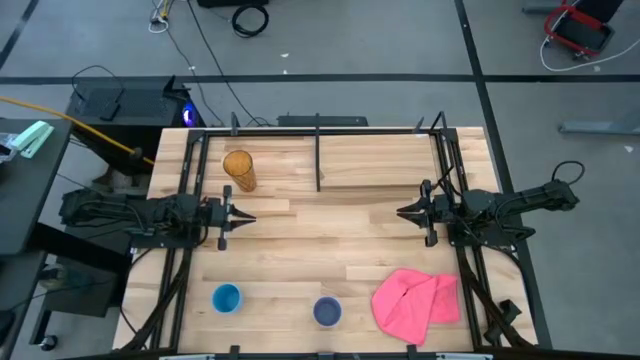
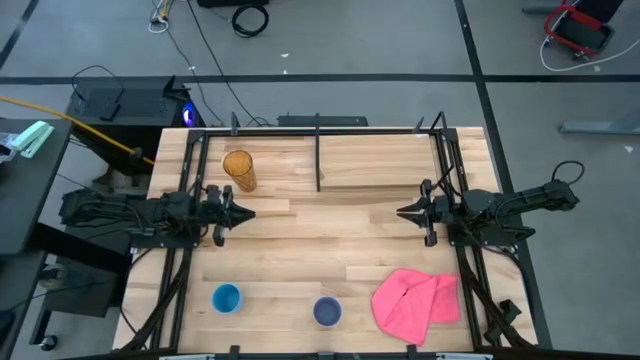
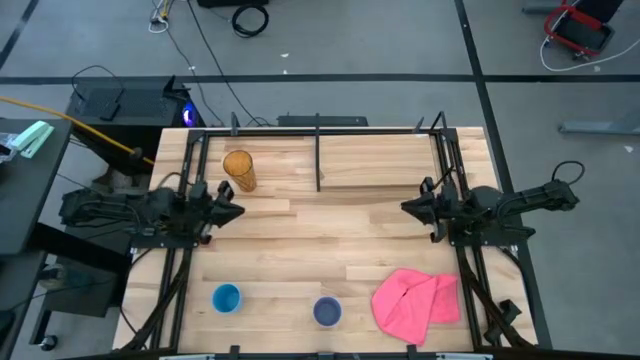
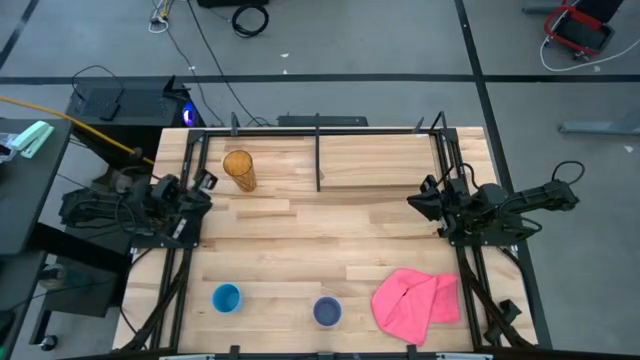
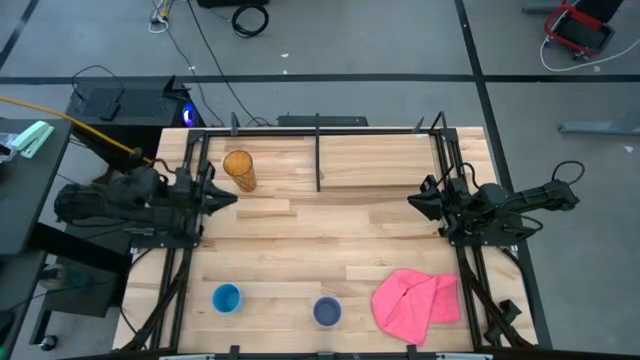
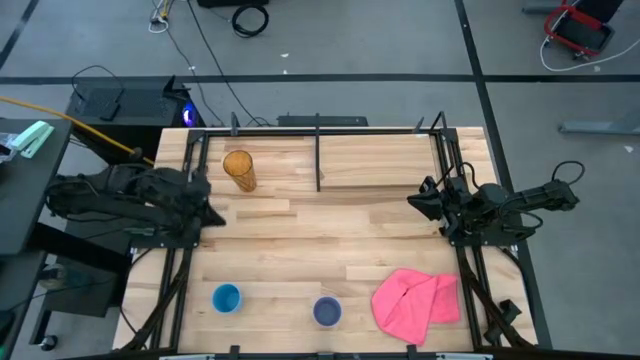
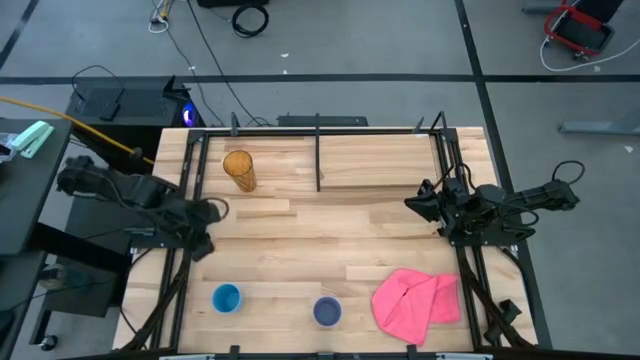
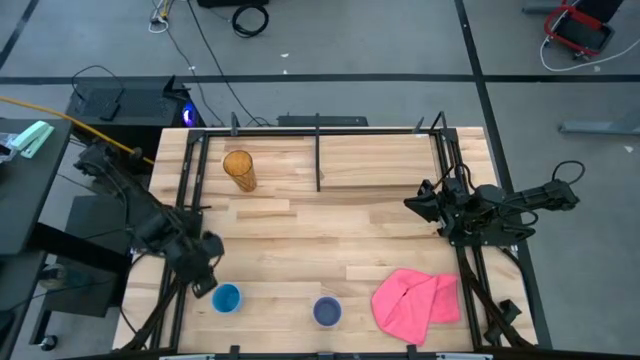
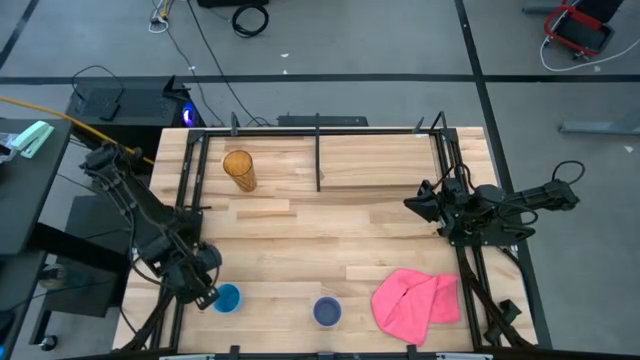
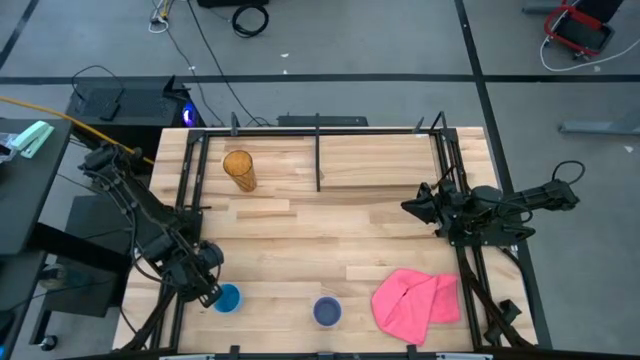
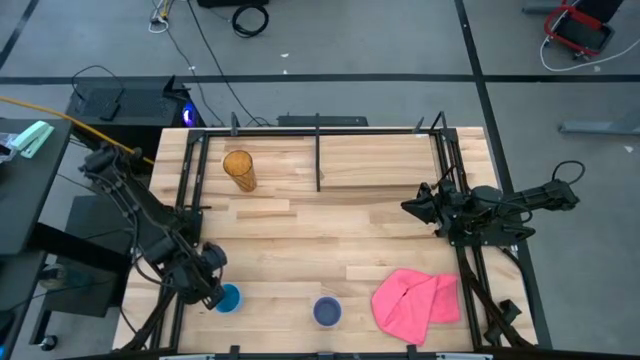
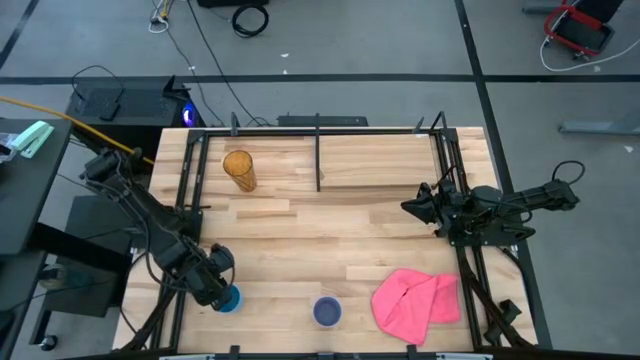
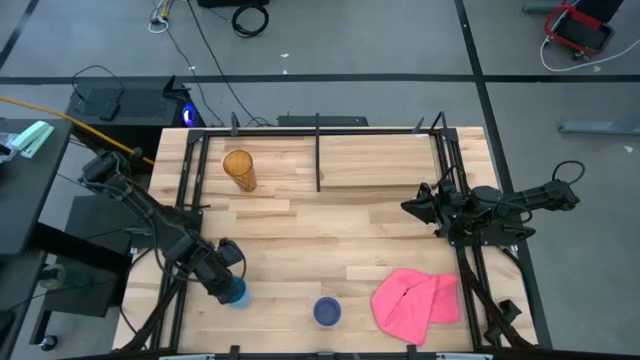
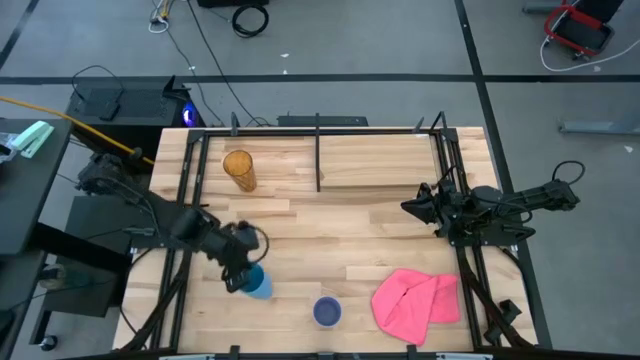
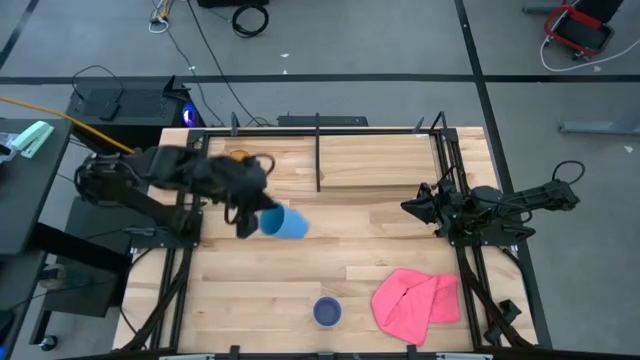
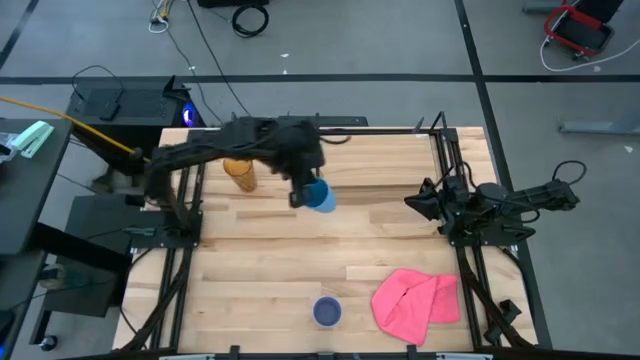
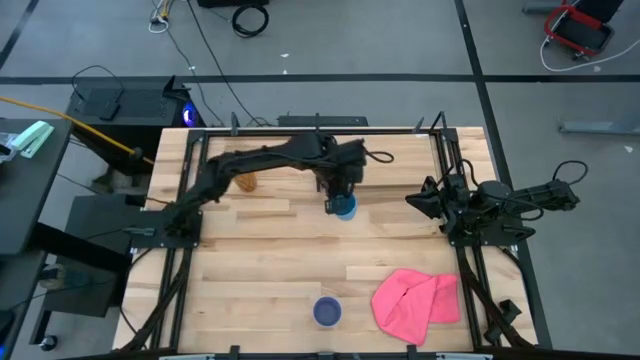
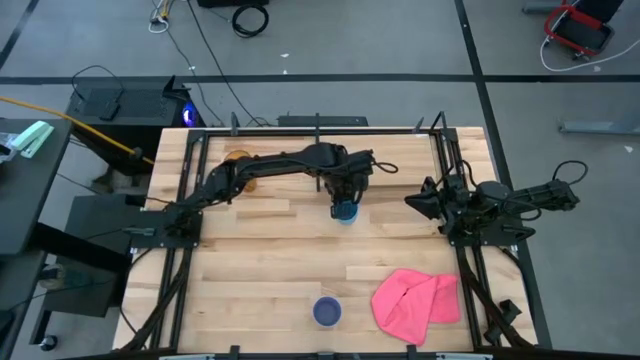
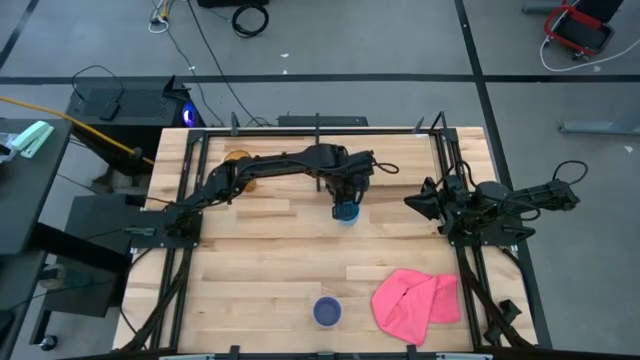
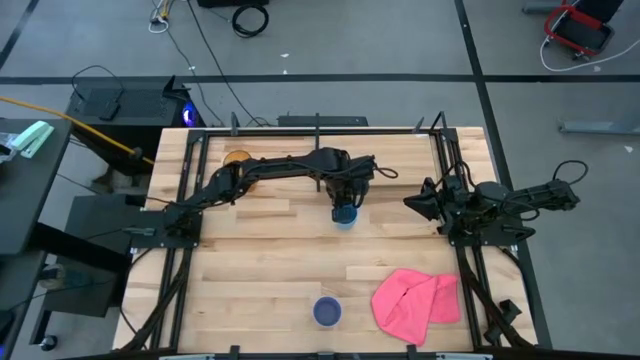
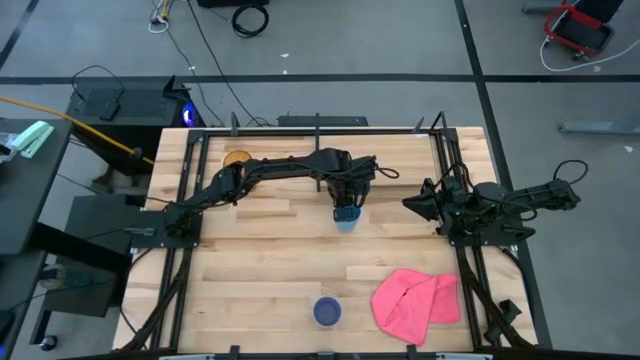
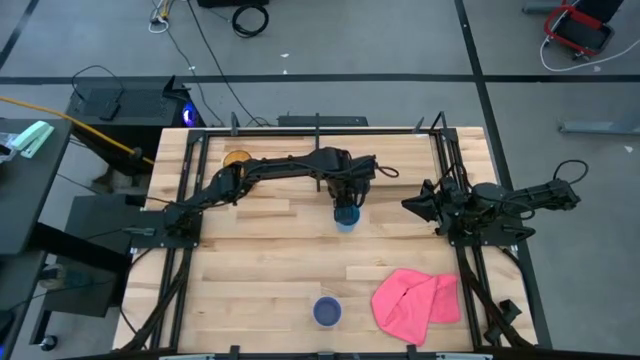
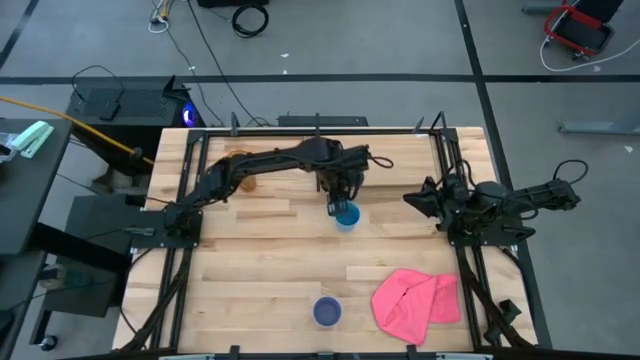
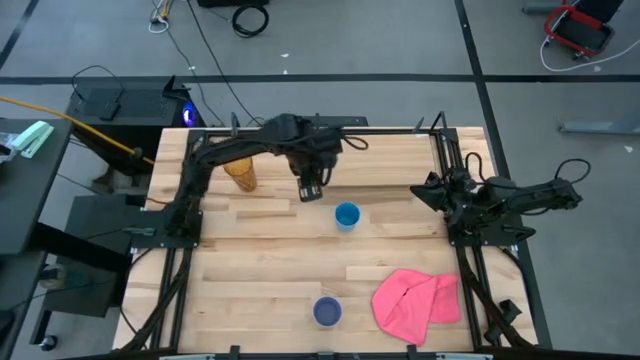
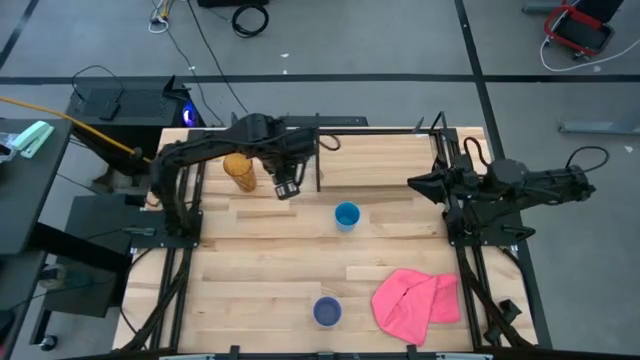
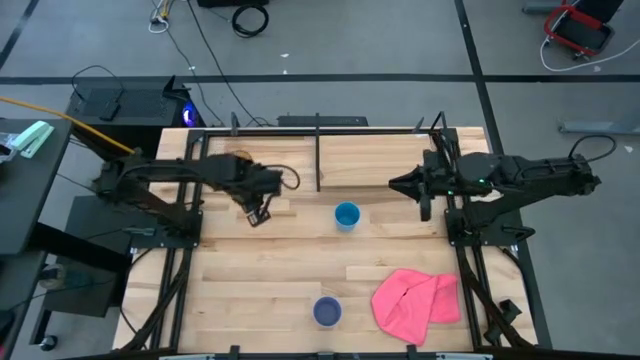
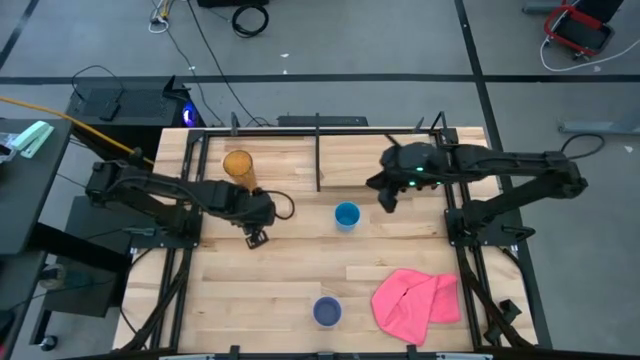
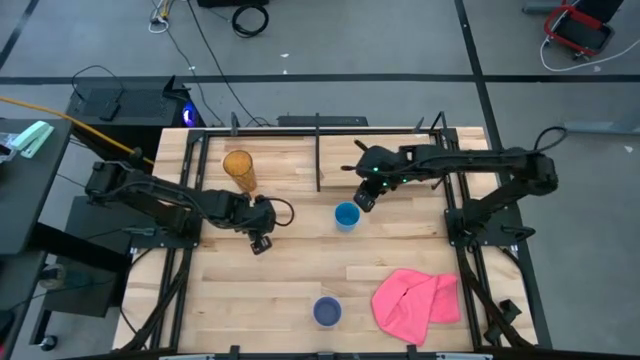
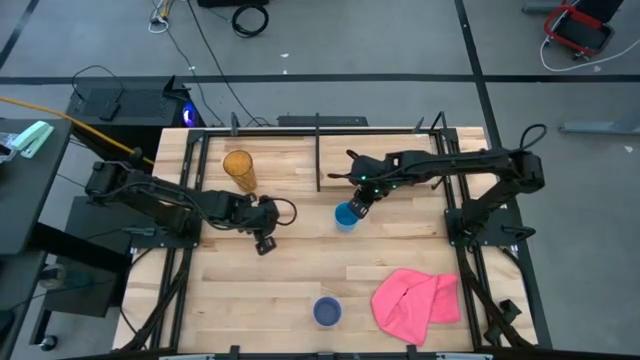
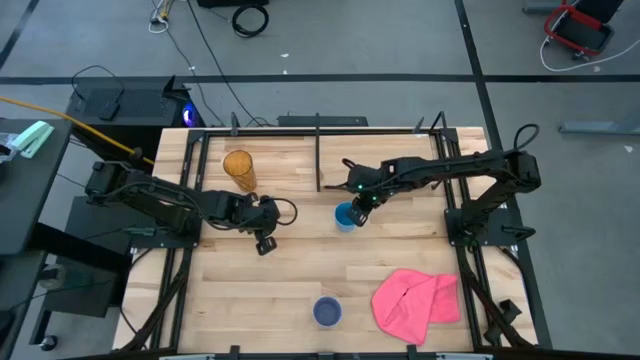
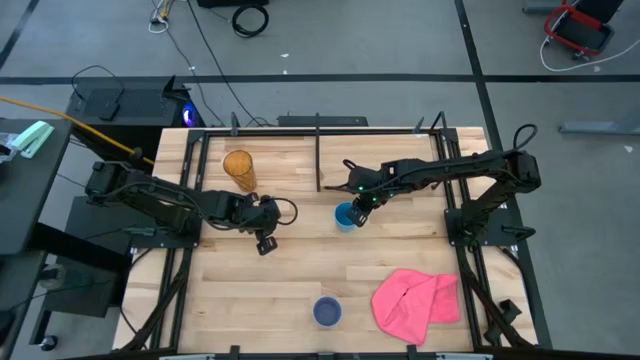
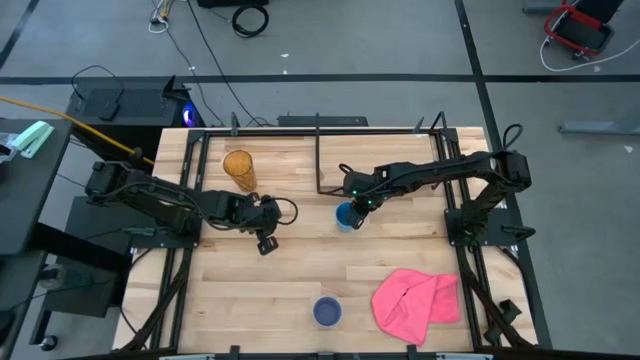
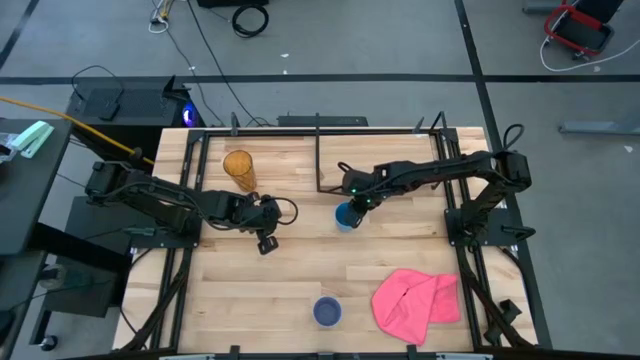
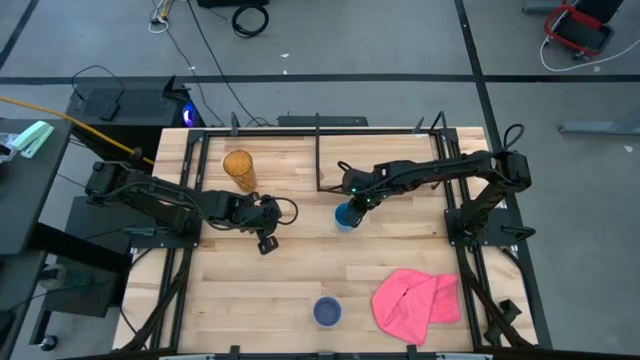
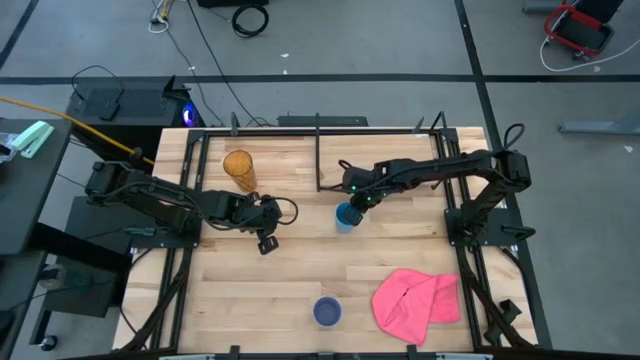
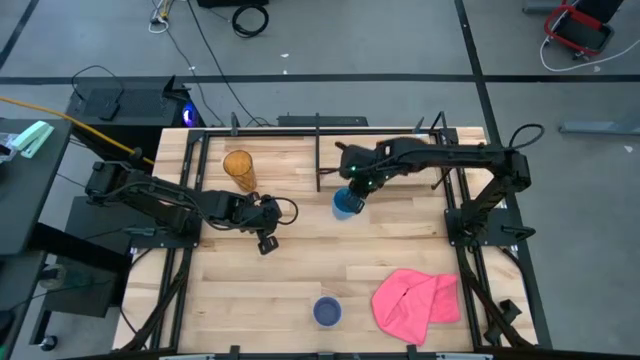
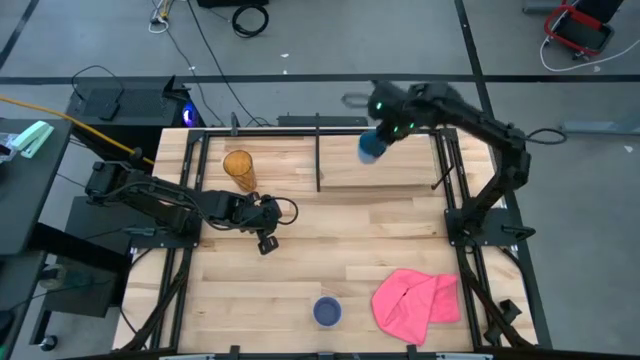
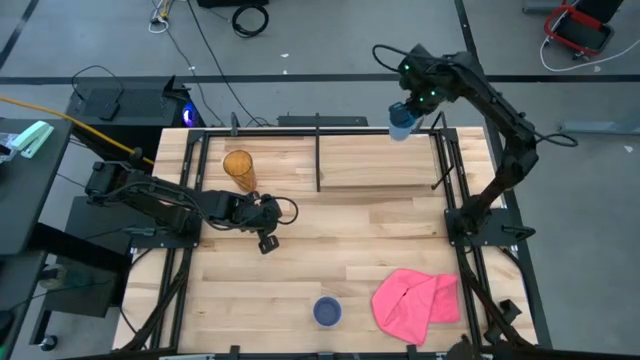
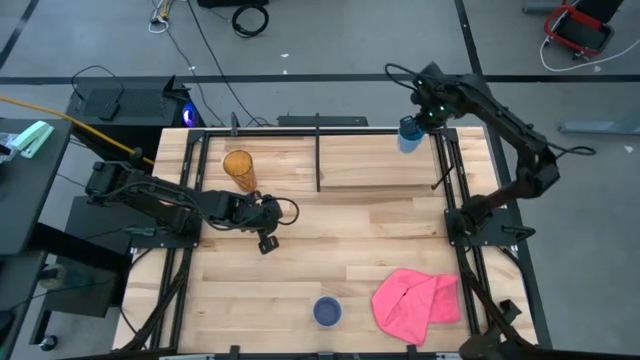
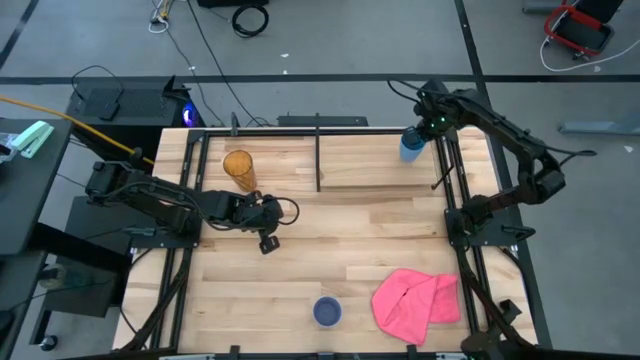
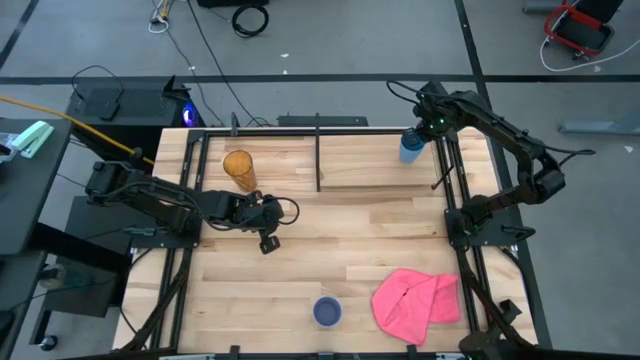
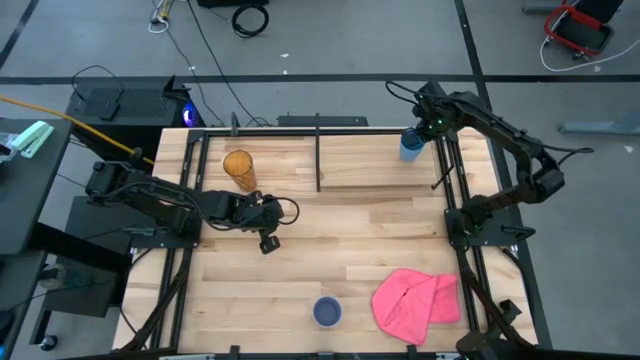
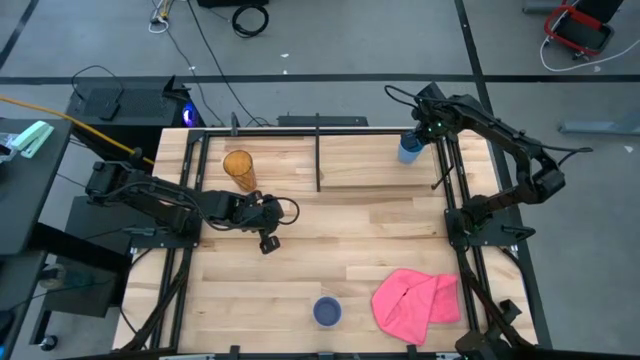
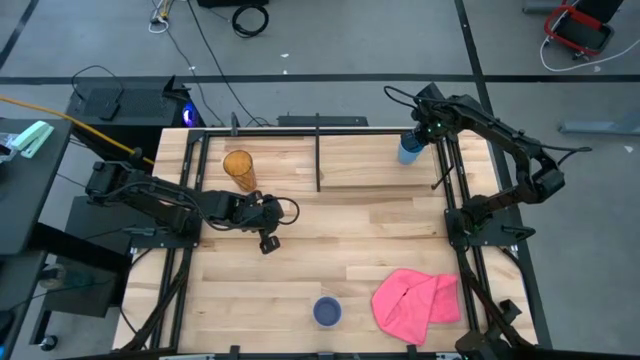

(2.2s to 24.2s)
Task: Stack small to large cups/mugs on shelf
Put the blue cup on the shelf
